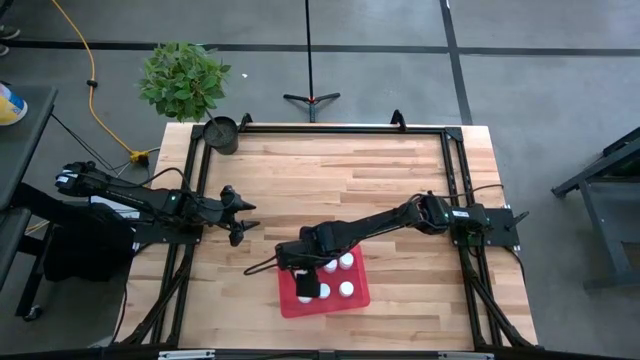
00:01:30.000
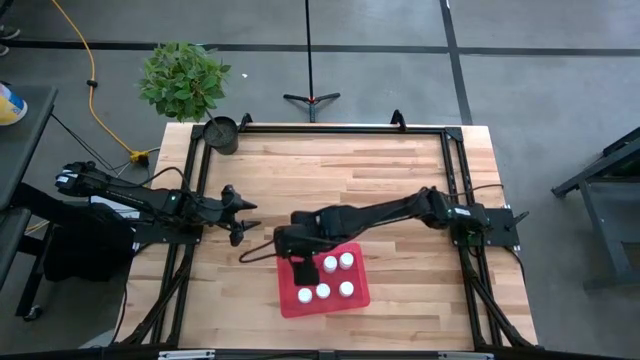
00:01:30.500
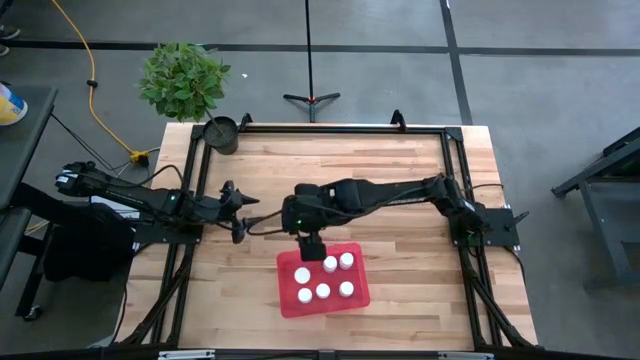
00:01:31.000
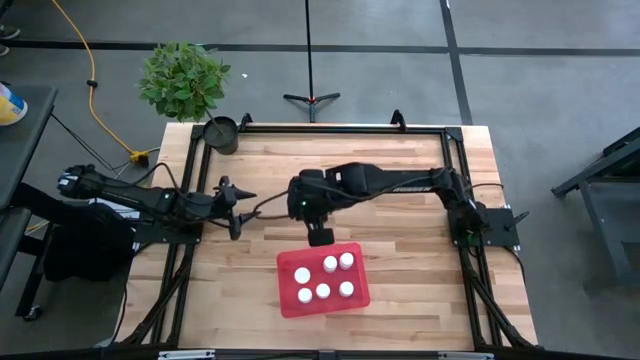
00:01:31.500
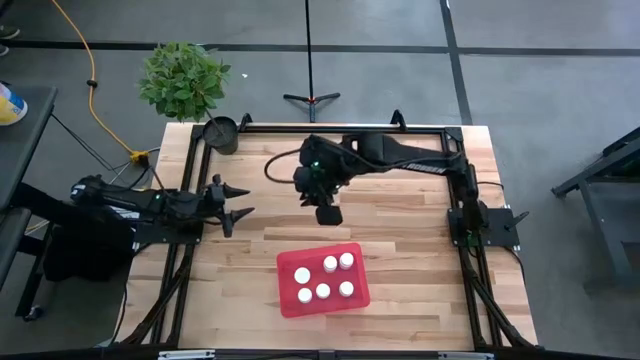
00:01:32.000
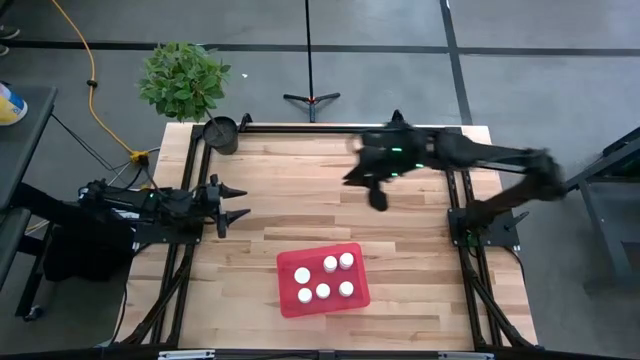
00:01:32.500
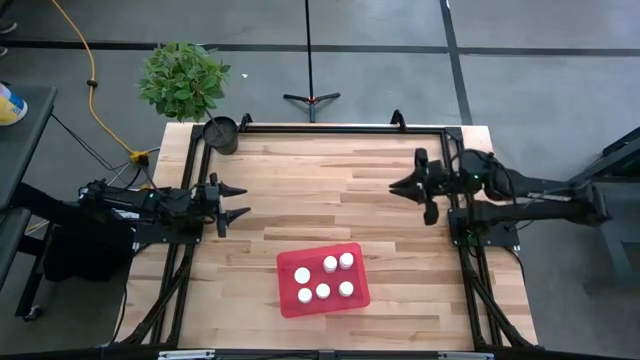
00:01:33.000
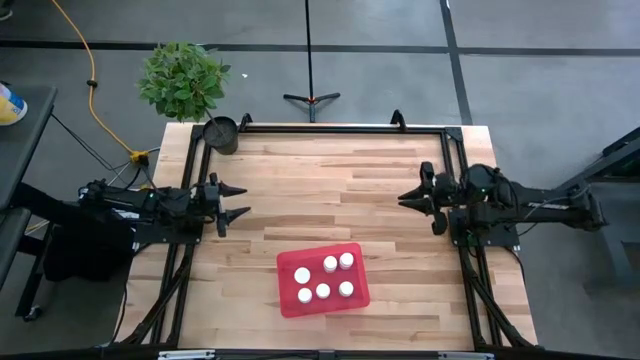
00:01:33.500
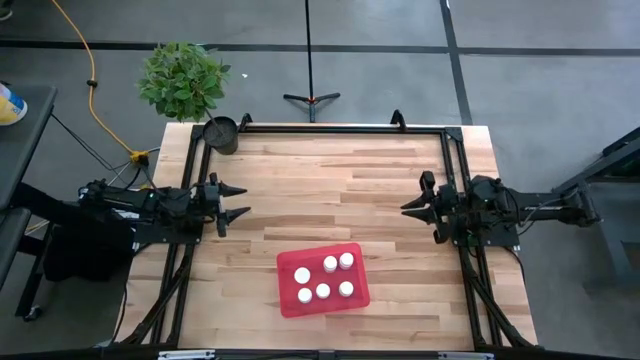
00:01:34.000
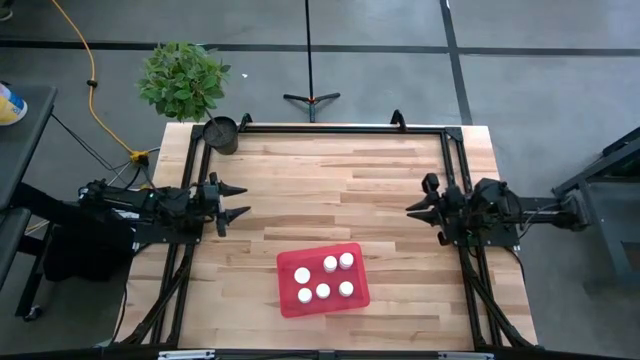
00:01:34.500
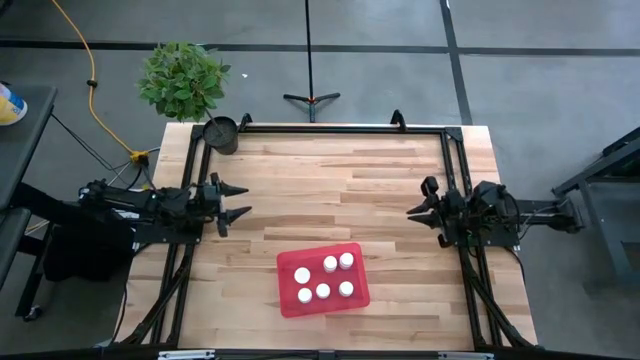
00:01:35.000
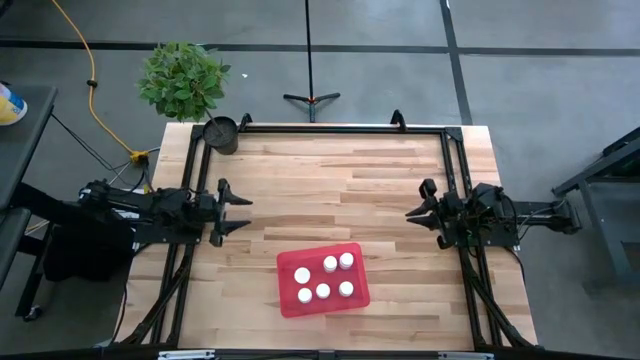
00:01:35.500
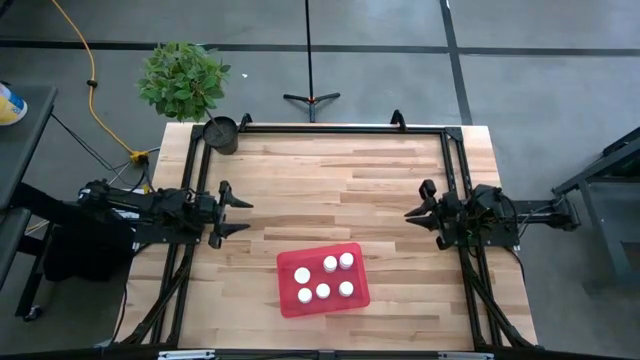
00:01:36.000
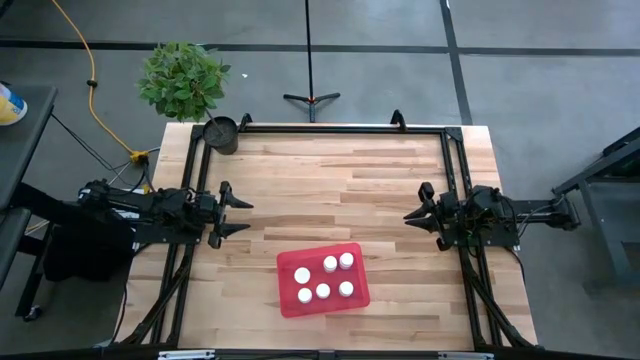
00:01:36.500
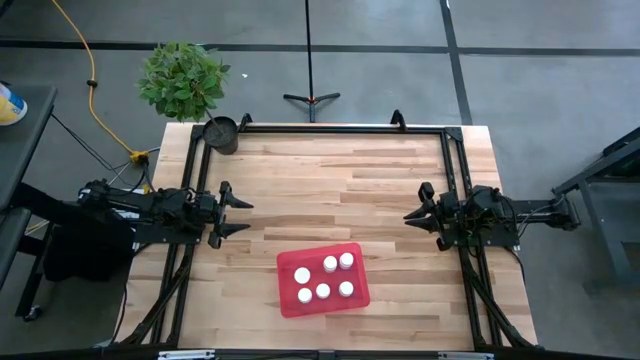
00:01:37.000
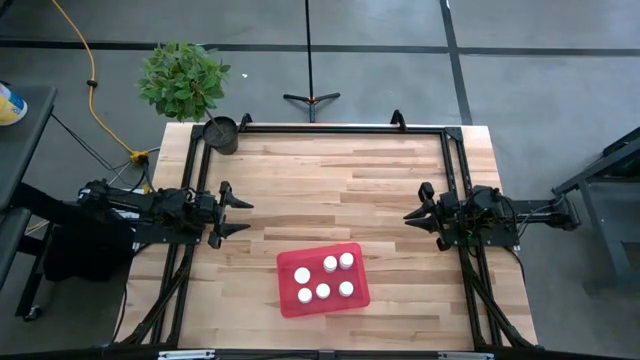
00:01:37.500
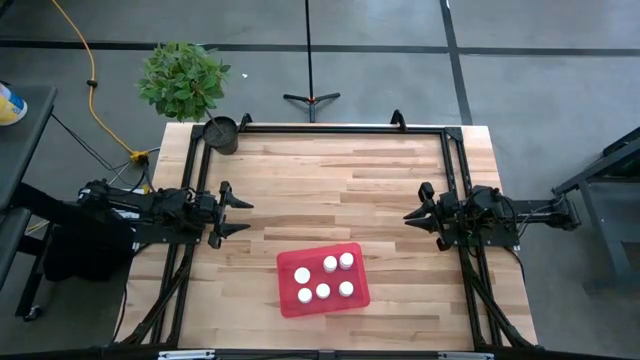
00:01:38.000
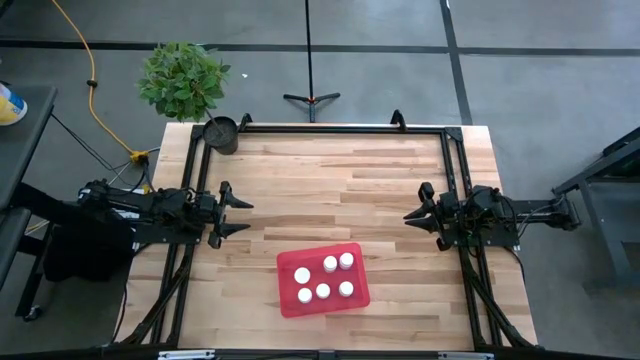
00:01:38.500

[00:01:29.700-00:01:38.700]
Task: Pick and place pill bottles into a basket
Return to Home Position

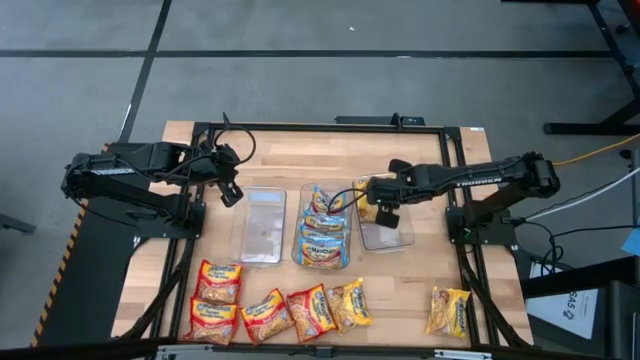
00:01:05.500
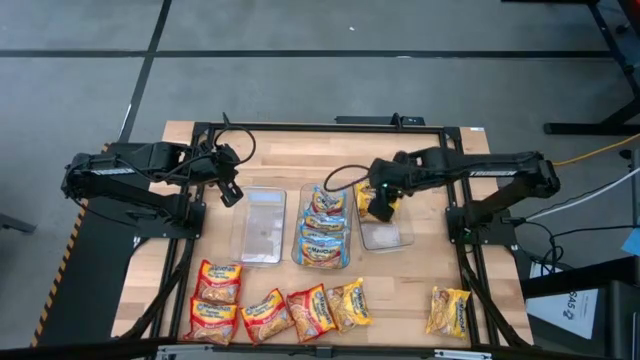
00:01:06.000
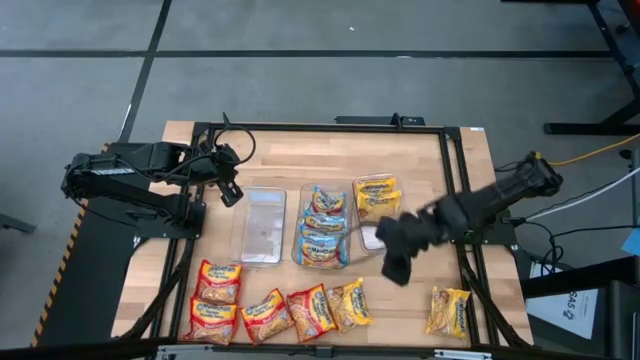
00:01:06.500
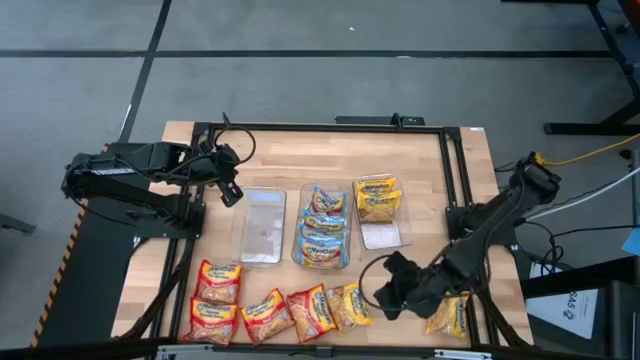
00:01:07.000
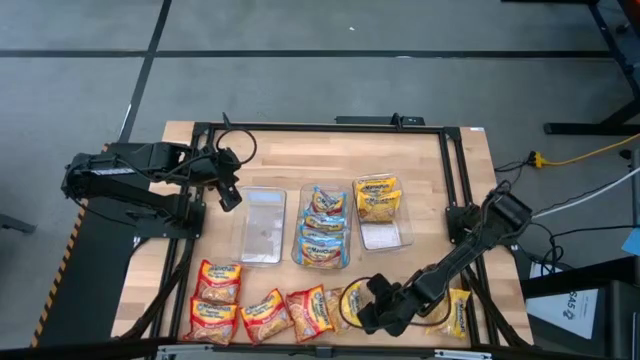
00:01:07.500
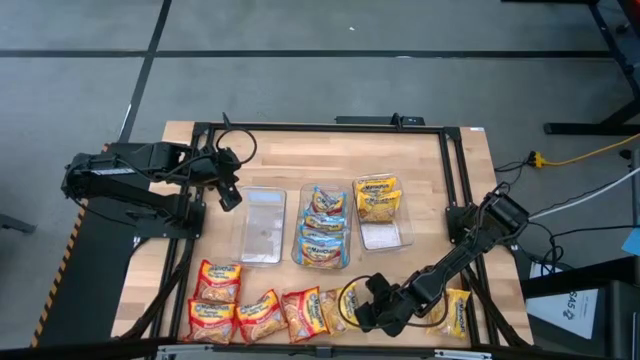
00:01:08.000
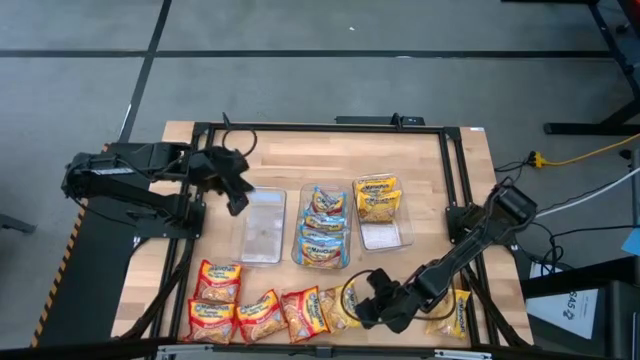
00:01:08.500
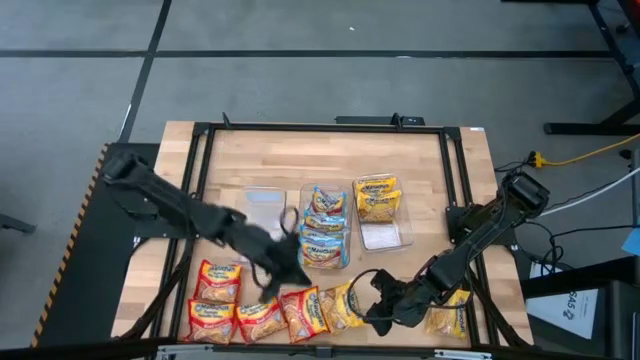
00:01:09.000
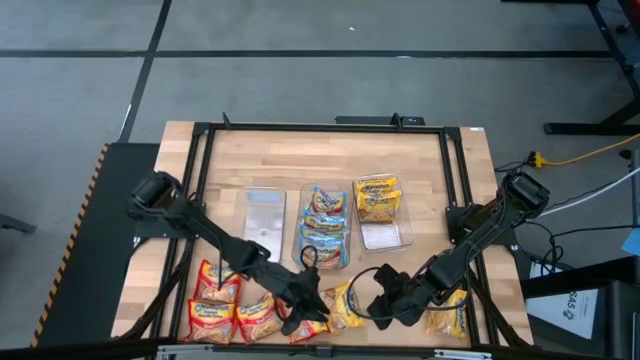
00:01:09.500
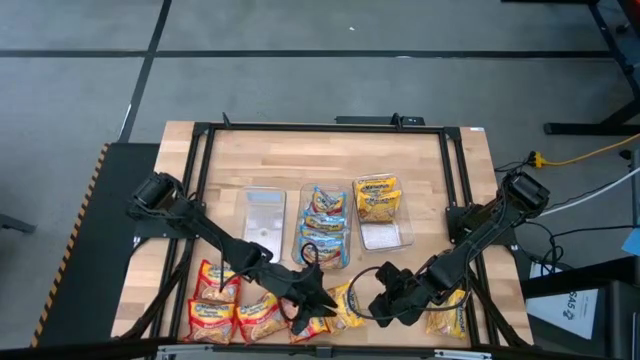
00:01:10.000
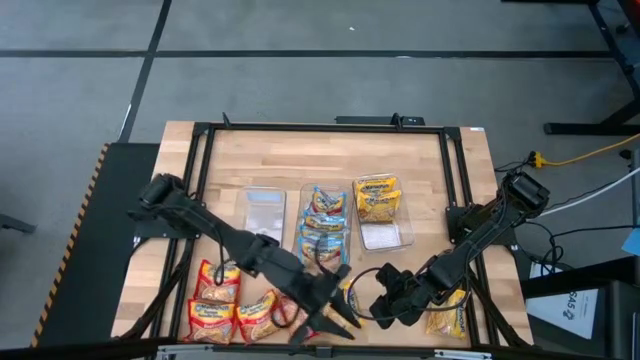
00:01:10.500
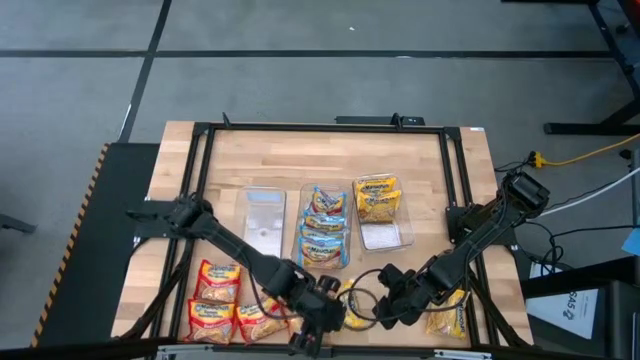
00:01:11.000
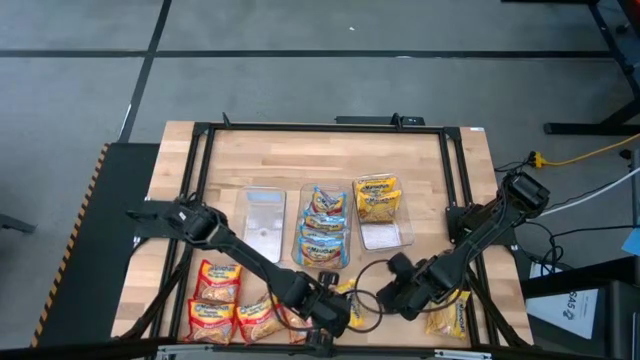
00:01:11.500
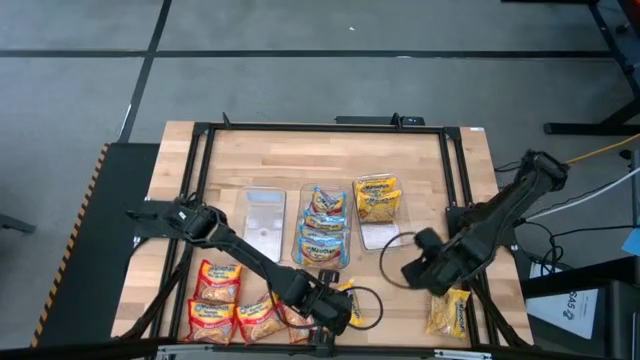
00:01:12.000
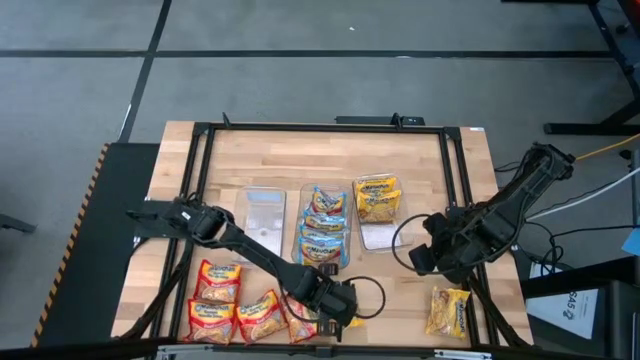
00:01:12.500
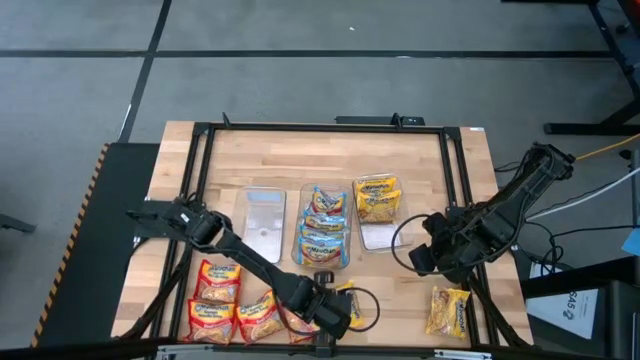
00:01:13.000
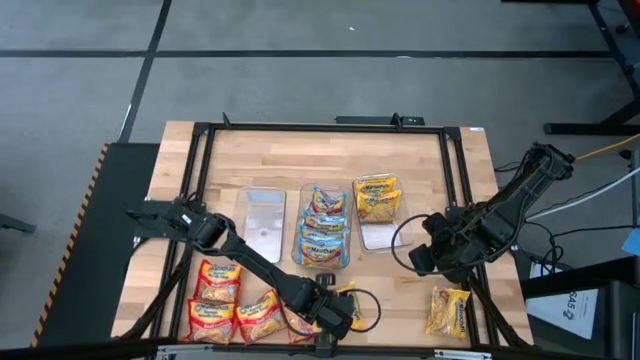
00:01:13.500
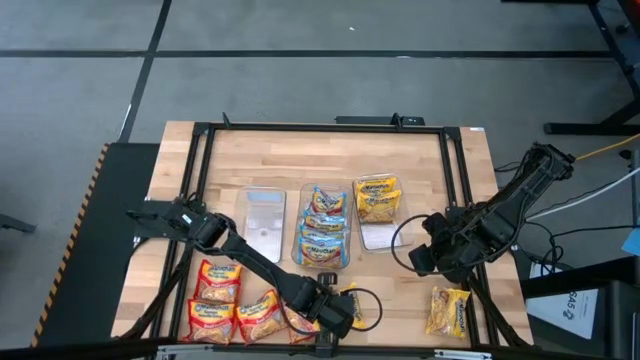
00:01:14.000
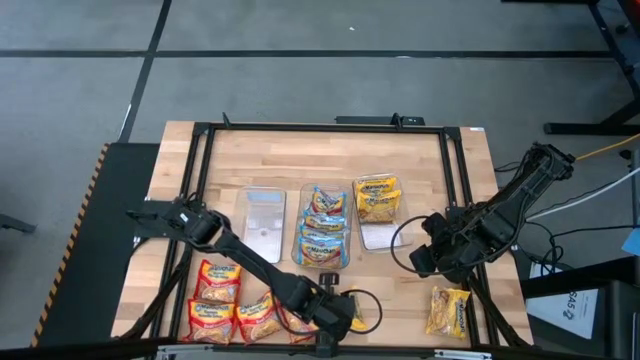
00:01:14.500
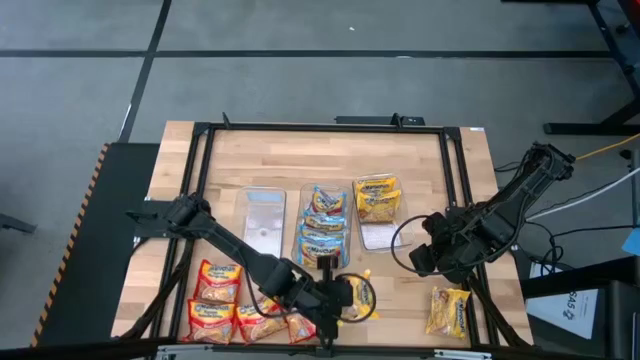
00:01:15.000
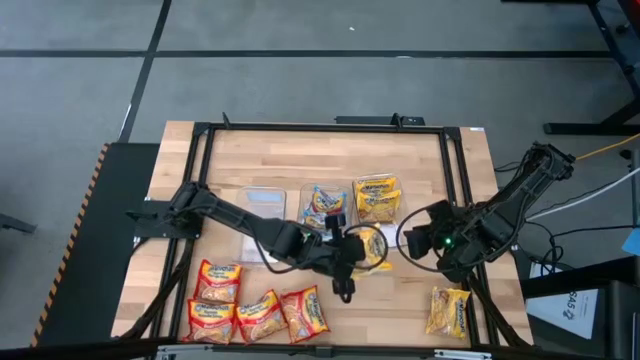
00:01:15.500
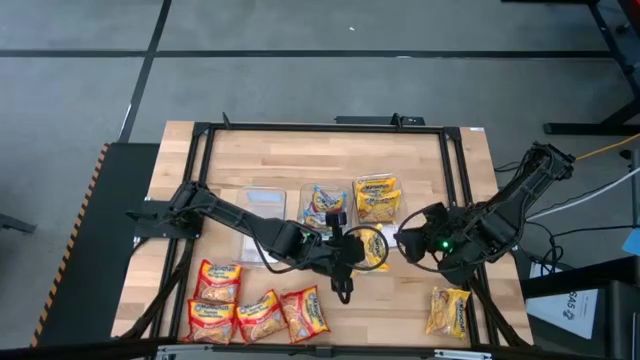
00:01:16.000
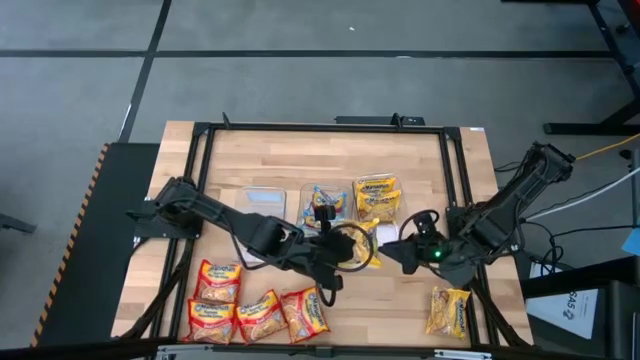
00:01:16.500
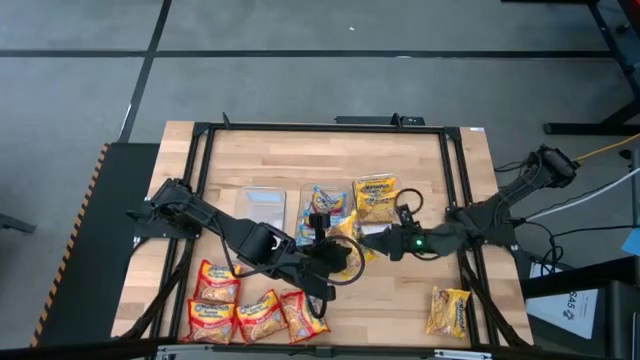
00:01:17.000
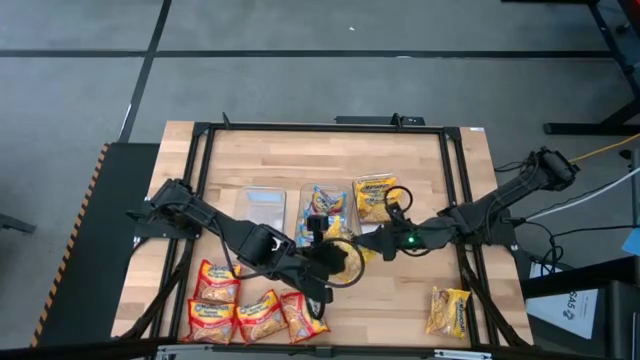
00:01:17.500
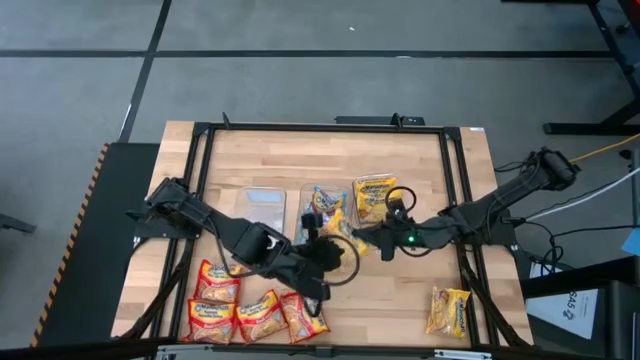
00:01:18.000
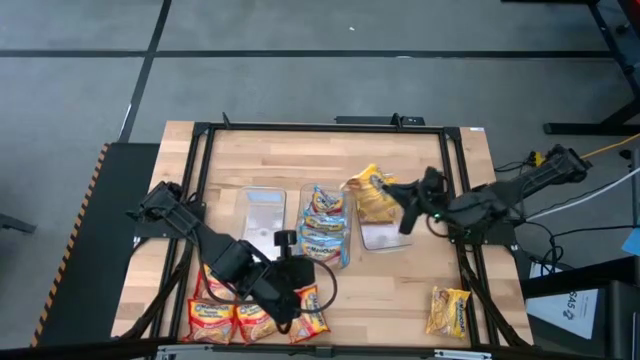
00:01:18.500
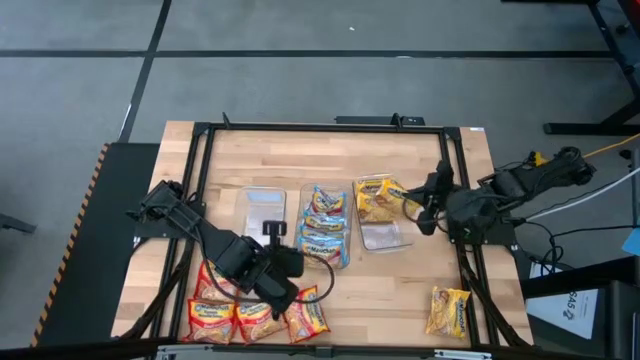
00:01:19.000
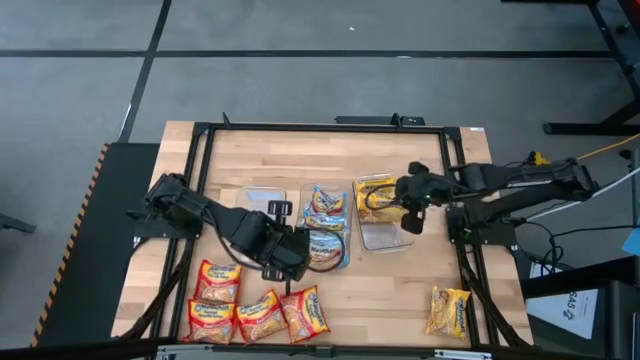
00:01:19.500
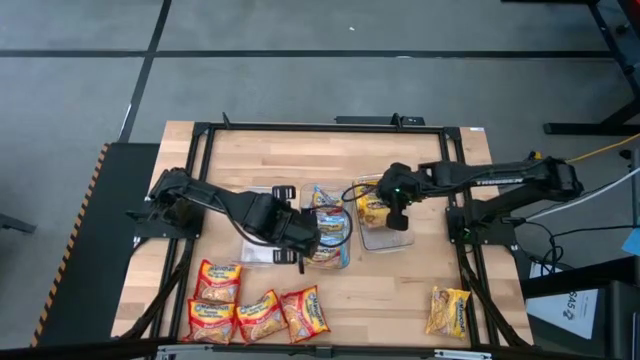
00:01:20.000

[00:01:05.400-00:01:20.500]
Task: Sort Maruchan noodles
Put the yellow noodle pack into the right transparent bin
